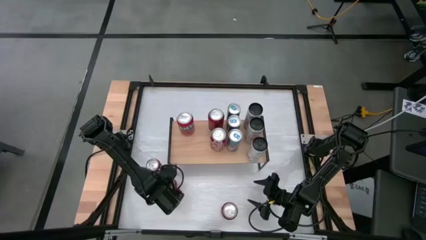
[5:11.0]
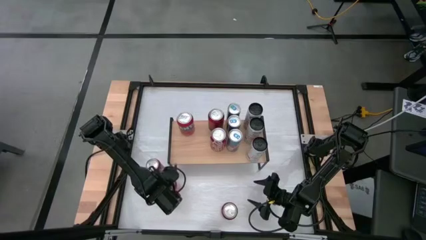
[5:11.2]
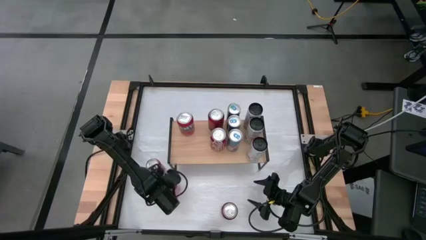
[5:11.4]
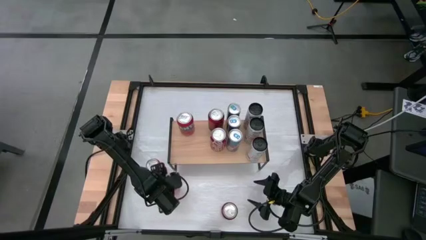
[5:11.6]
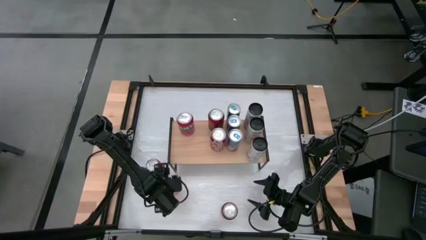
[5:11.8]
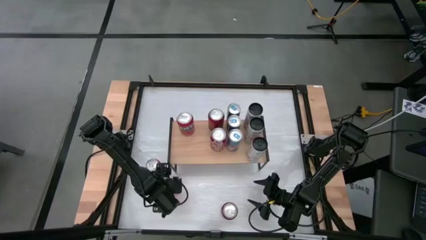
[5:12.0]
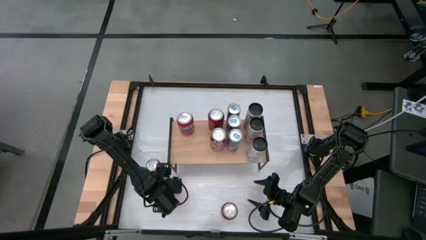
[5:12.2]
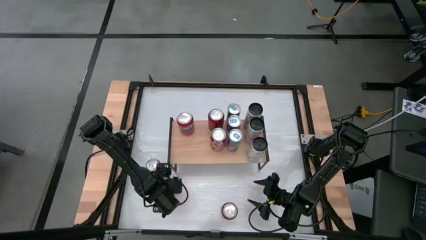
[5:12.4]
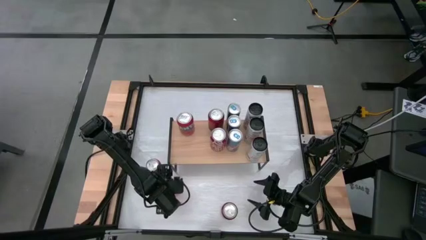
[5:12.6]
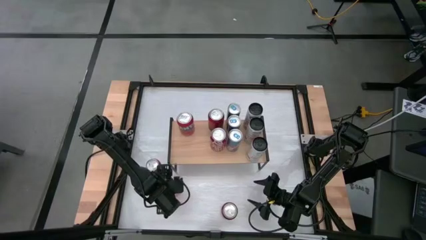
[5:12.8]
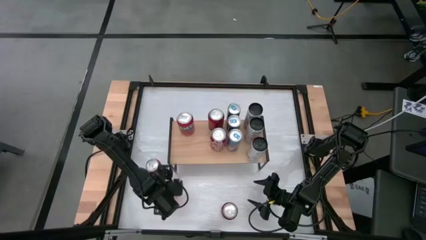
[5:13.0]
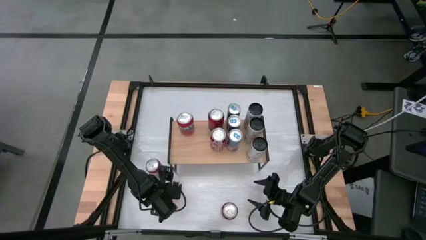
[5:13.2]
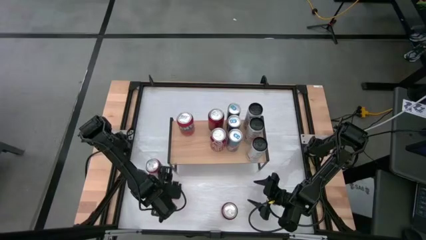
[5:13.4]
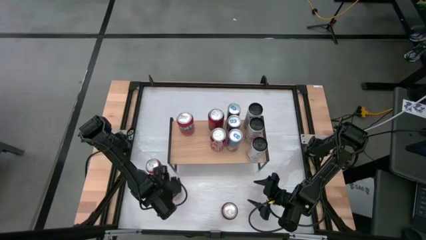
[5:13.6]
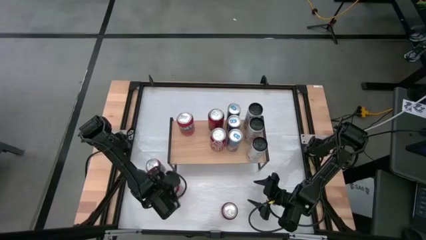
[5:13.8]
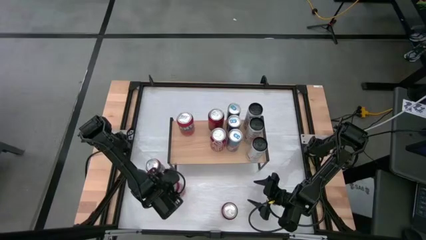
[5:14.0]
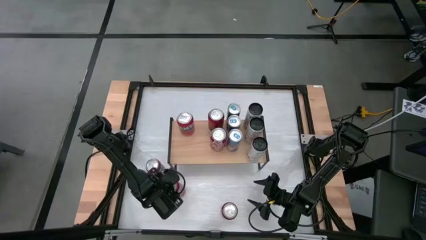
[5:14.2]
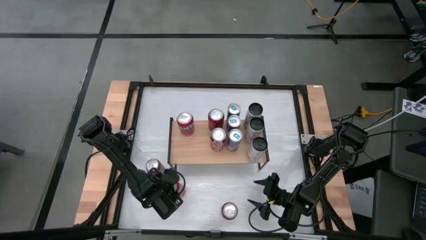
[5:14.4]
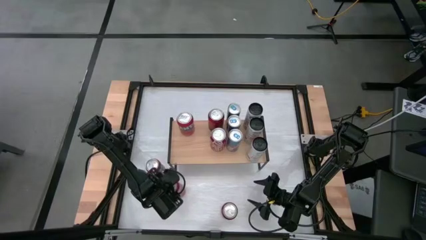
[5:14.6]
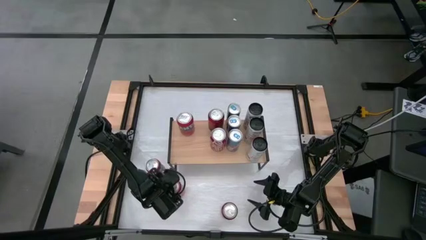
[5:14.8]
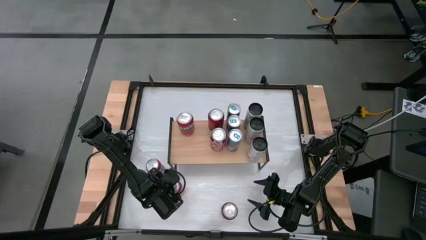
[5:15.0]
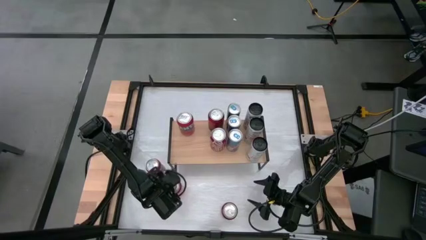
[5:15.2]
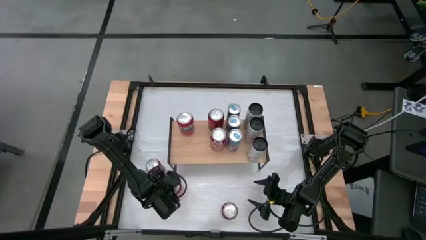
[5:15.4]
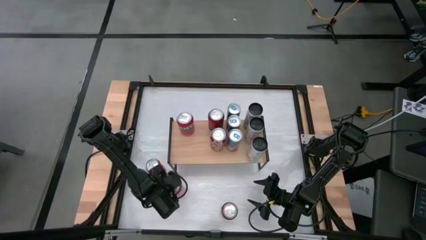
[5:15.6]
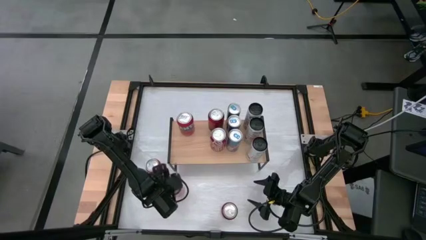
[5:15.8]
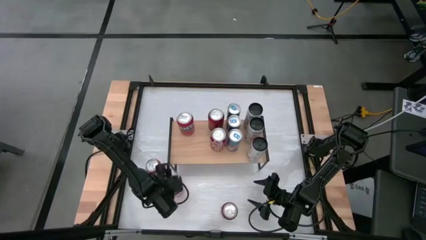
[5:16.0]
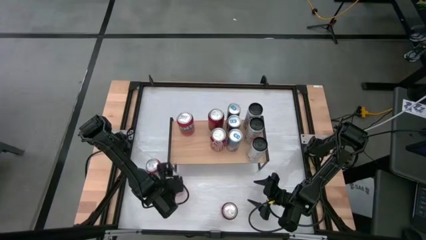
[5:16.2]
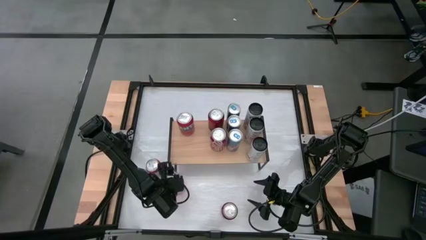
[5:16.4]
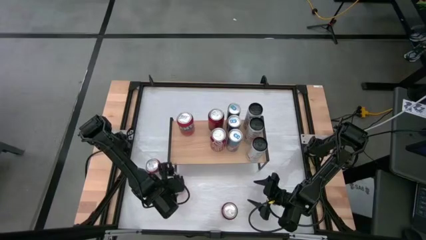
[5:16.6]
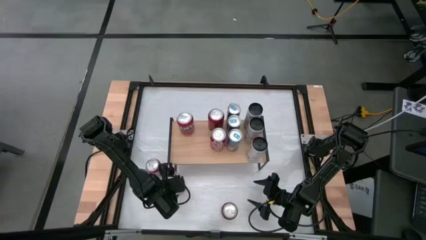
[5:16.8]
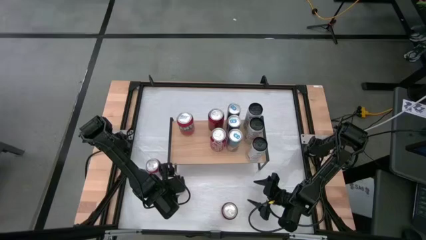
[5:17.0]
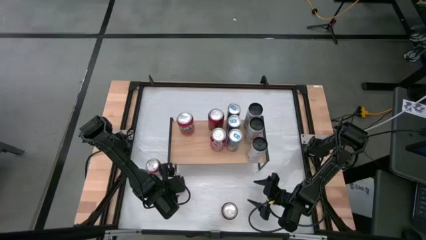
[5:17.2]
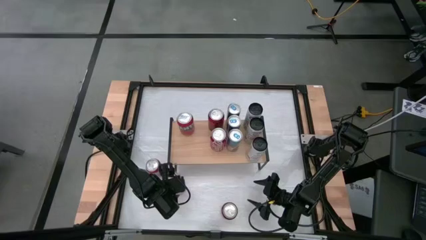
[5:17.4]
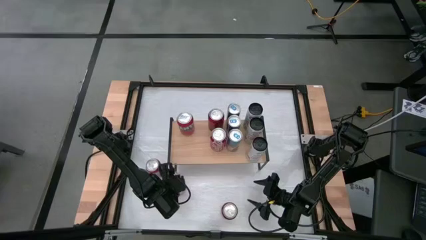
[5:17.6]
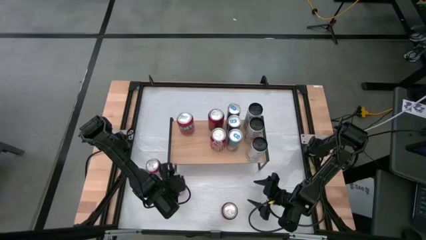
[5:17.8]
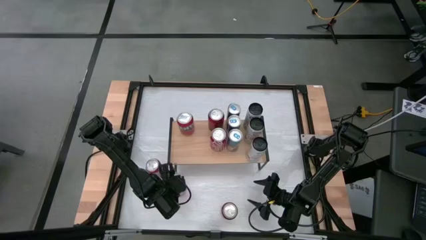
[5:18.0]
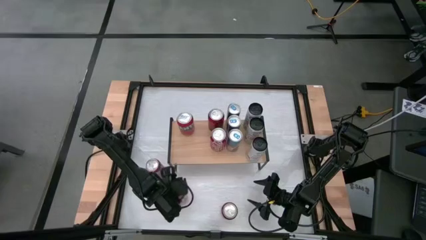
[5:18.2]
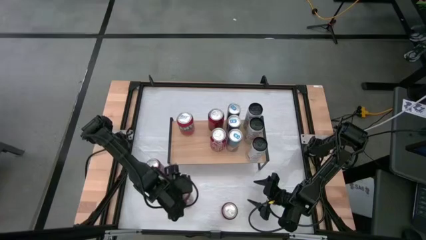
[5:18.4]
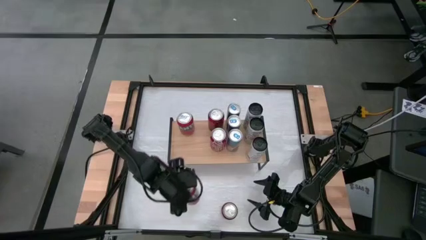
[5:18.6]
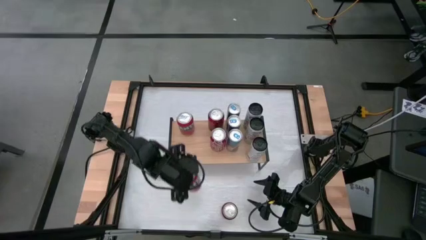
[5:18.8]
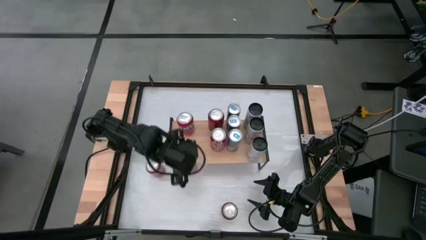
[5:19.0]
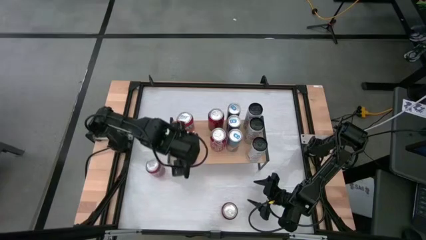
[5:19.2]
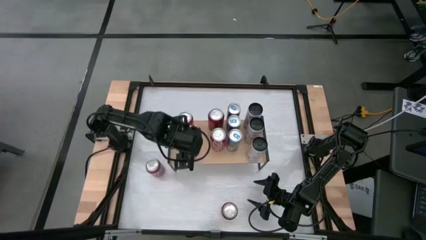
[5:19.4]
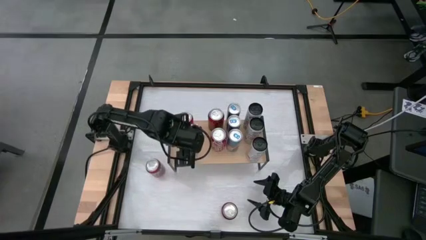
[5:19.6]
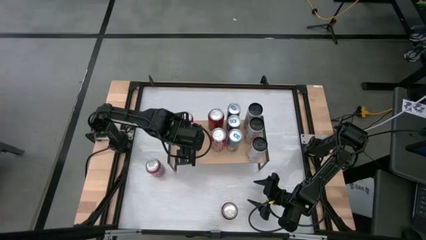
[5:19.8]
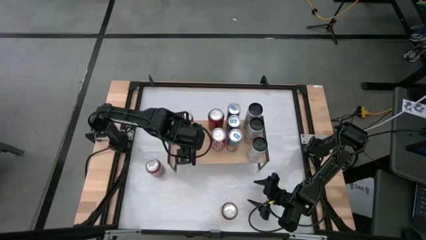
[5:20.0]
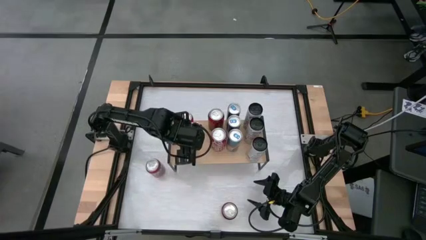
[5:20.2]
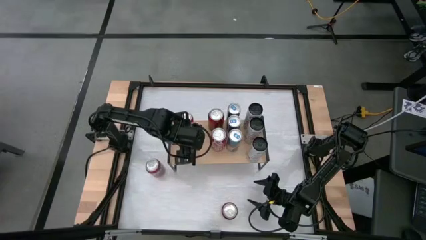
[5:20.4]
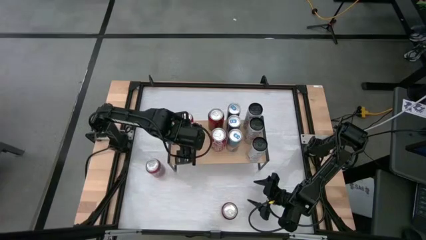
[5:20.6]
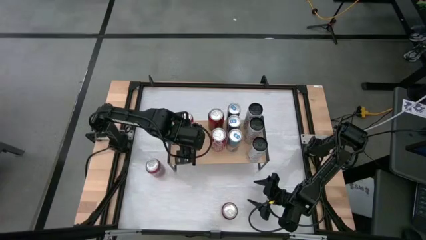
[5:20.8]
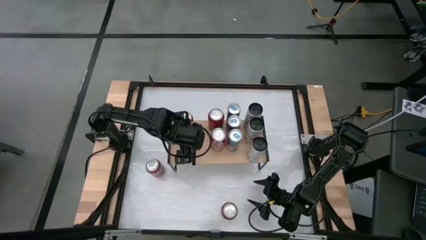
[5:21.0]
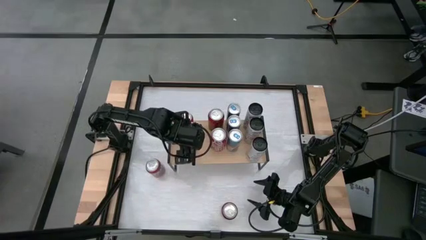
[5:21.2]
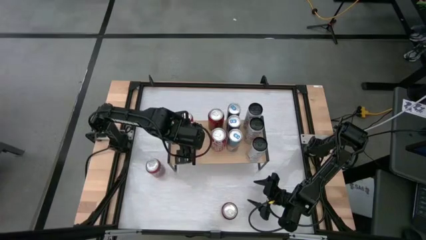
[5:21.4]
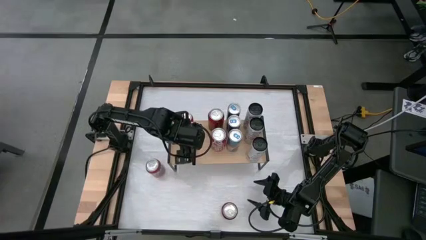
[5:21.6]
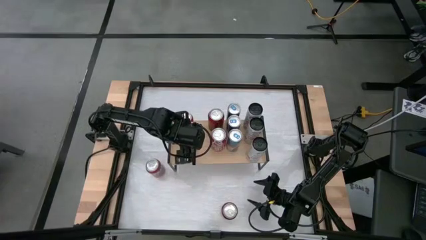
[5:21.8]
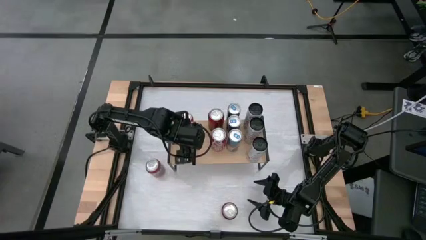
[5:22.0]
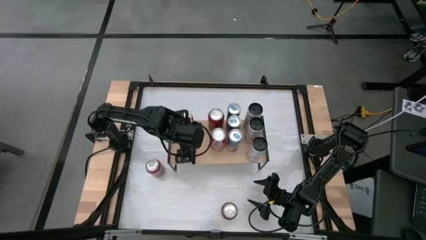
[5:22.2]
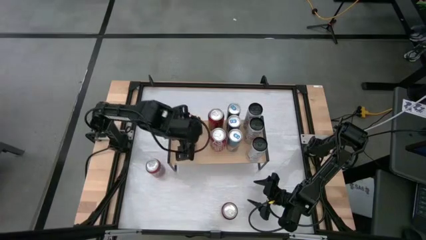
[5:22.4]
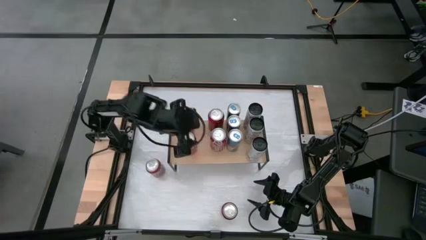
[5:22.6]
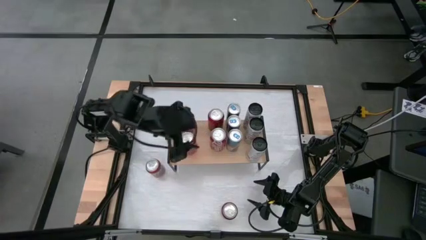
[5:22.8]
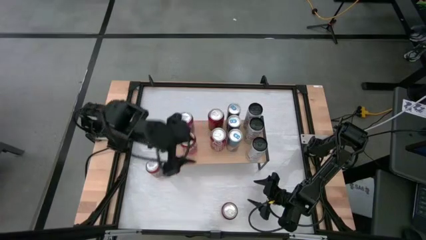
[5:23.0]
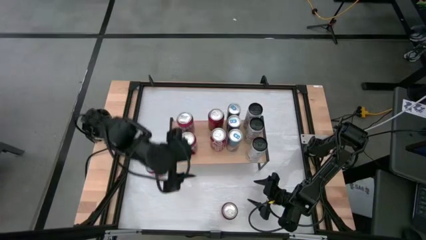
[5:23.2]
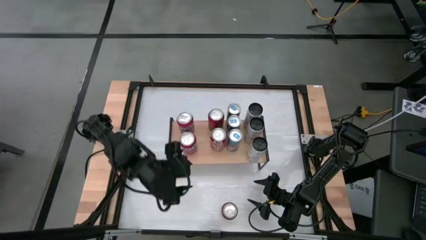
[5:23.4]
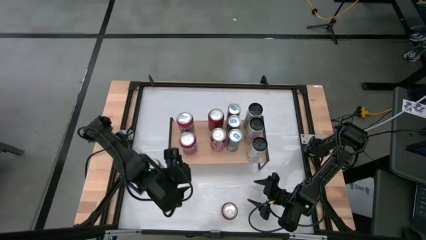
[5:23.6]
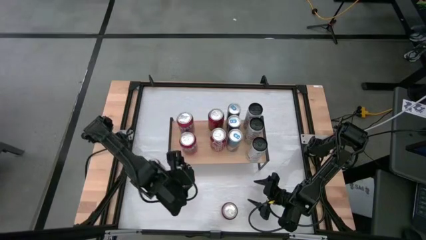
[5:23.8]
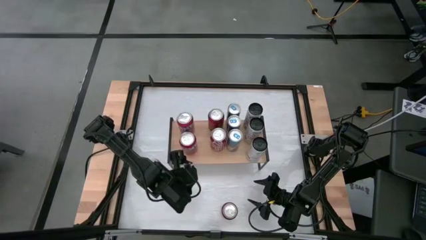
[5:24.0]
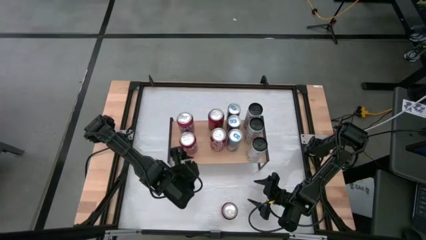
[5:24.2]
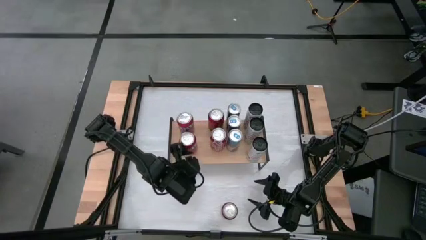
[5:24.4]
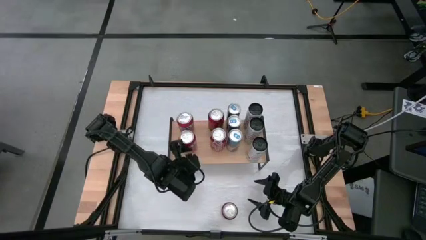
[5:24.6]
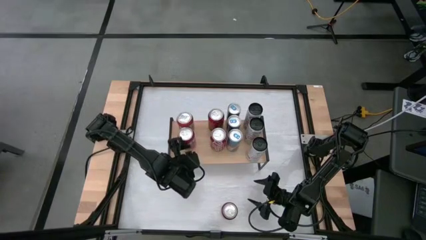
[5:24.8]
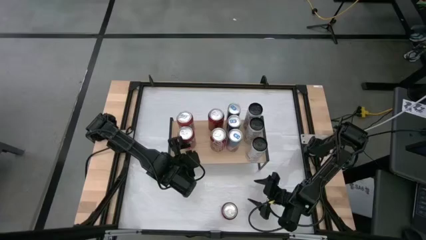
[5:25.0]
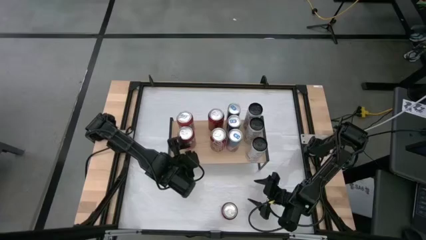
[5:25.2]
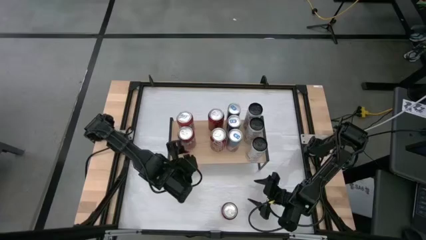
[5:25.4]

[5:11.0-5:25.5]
Task: Place canned beverage on shelf
Put the bottom red soda can on the shelf aligned with the other red soda can

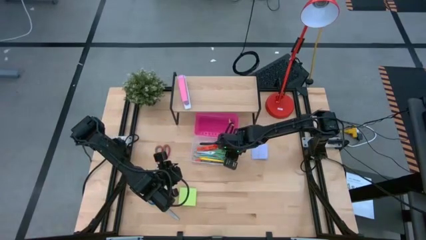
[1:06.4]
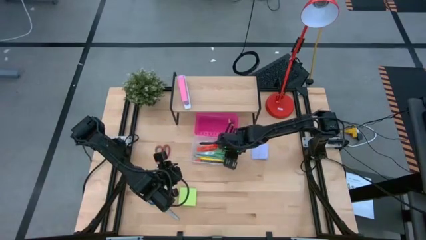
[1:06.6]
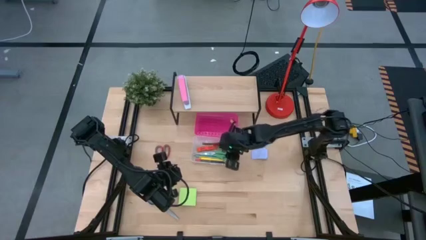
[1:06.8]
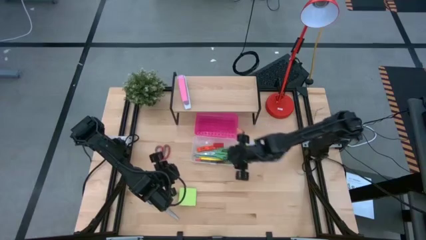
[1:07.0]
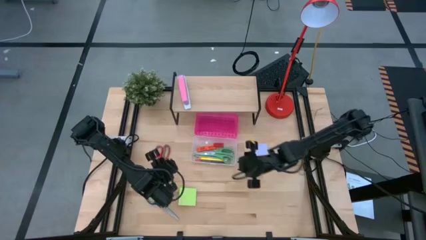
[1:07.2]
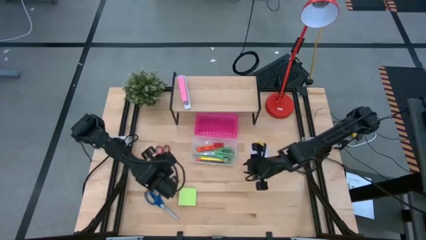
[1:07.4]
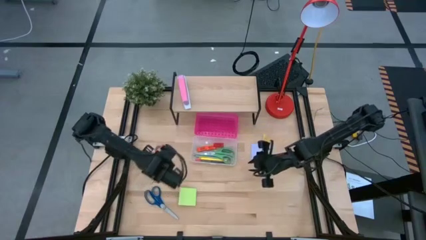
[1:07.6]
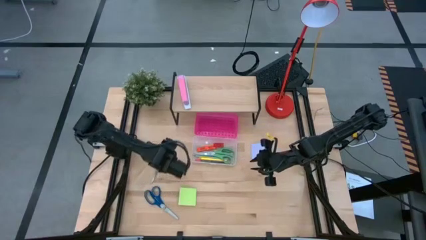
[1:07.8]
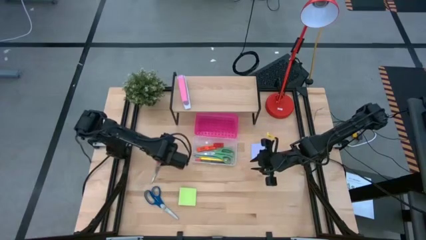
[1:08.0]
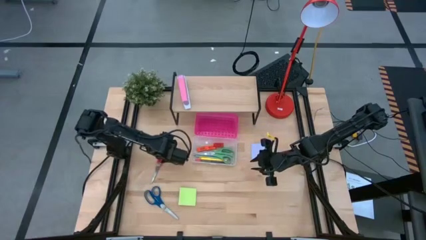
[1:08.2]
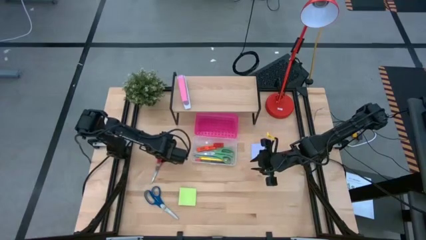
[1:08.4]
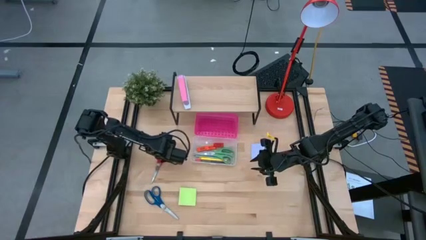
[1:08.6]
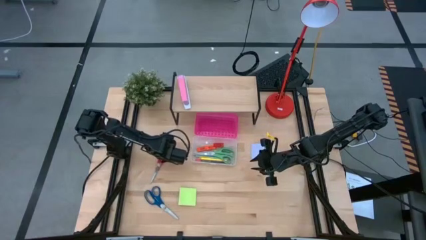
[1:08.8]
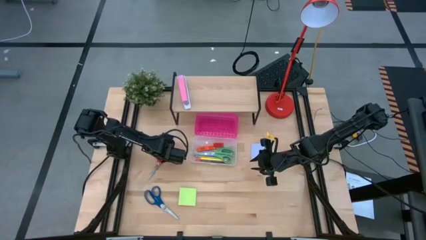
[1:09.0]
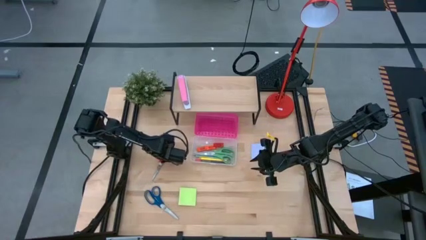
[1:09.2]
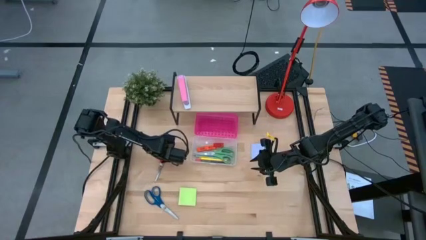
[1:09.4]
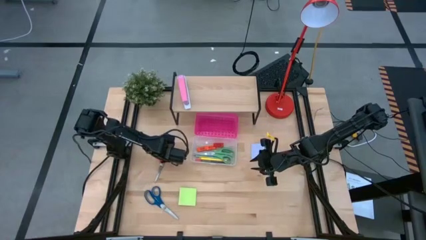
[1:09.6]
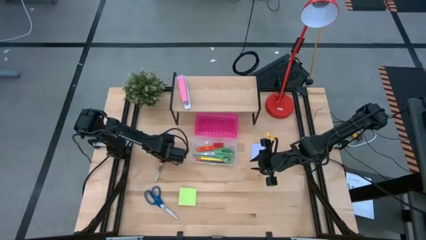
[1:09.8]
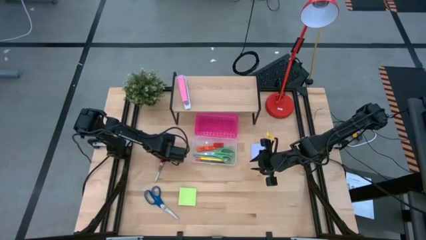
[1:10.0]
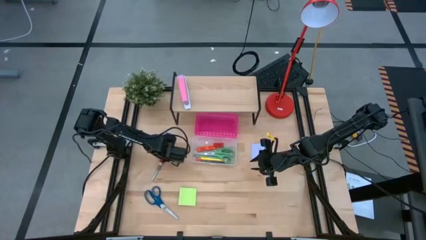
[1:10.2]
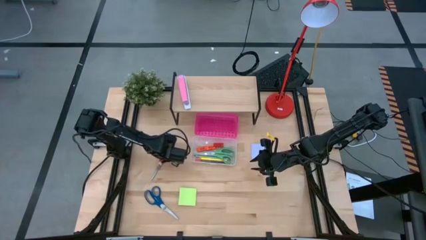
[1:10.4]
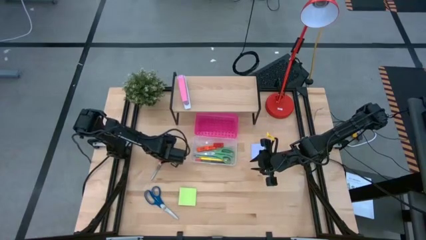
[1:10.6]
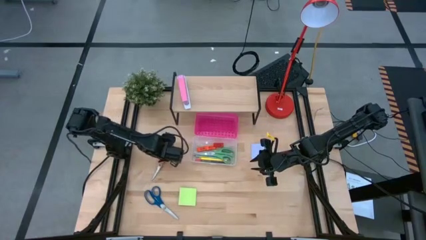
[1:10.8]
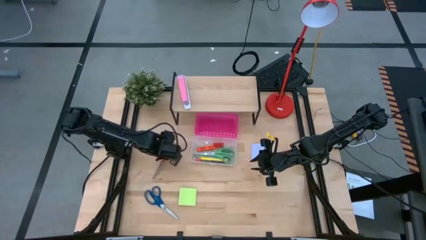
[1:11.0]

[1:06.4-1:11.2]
Task: Pack school essentials
Put the red scissors into the supply box
